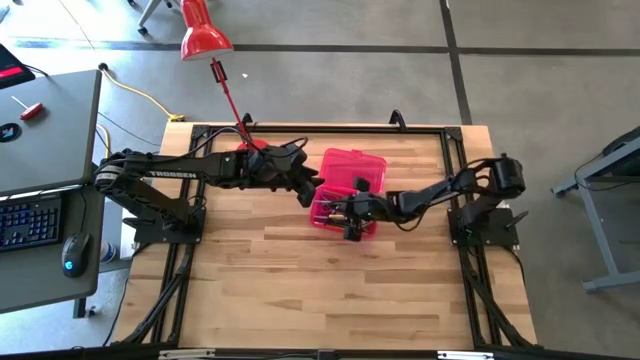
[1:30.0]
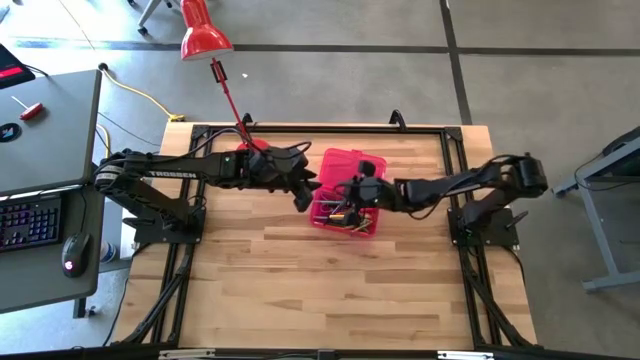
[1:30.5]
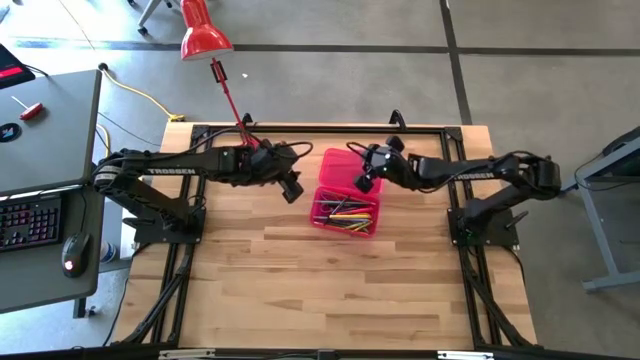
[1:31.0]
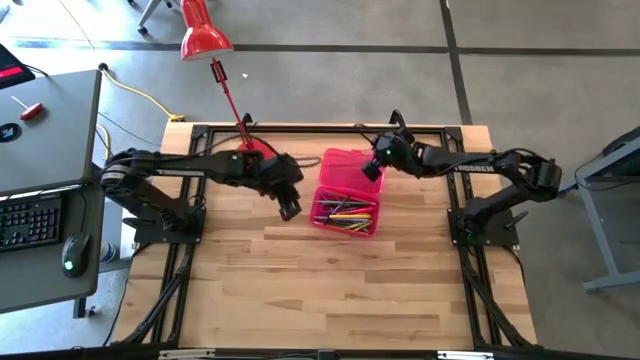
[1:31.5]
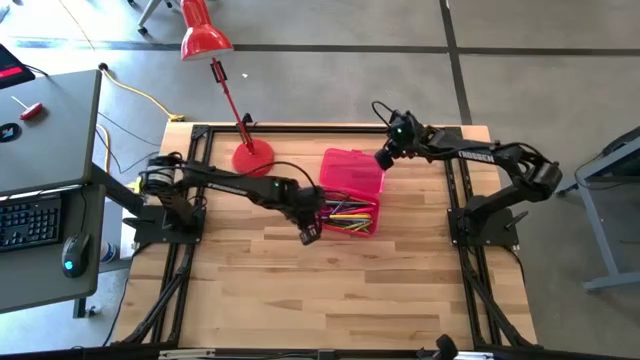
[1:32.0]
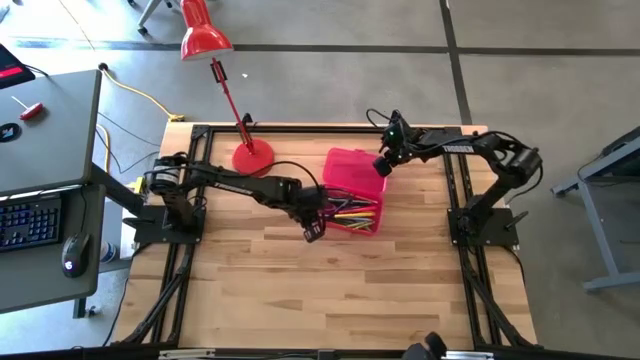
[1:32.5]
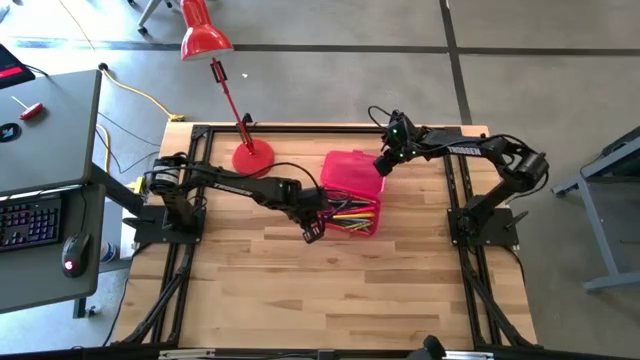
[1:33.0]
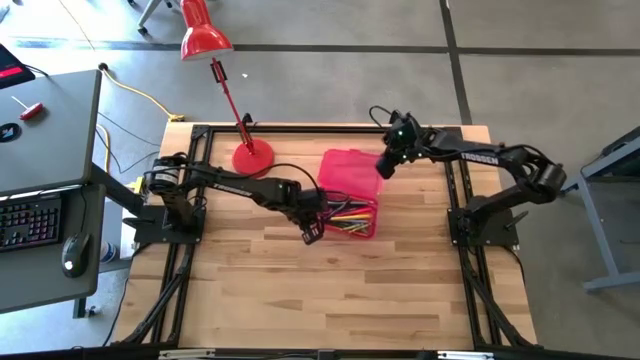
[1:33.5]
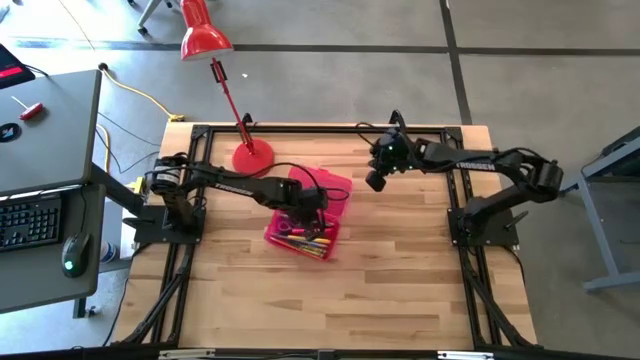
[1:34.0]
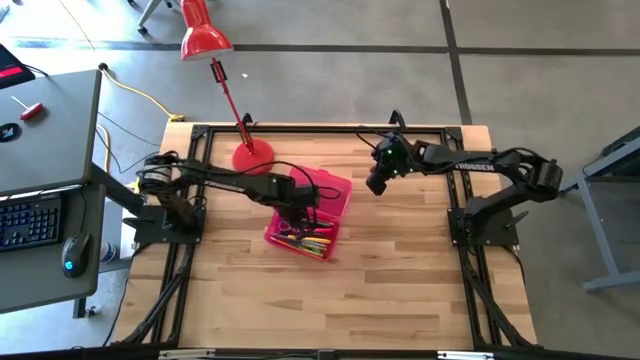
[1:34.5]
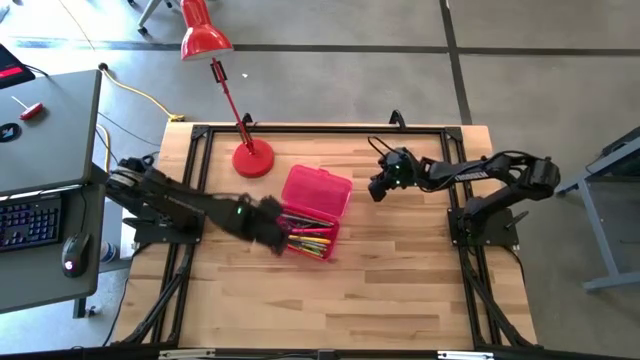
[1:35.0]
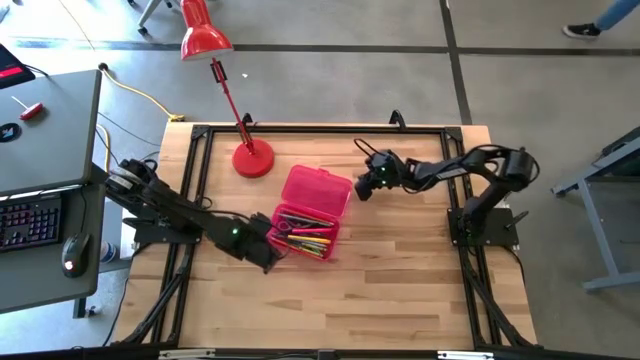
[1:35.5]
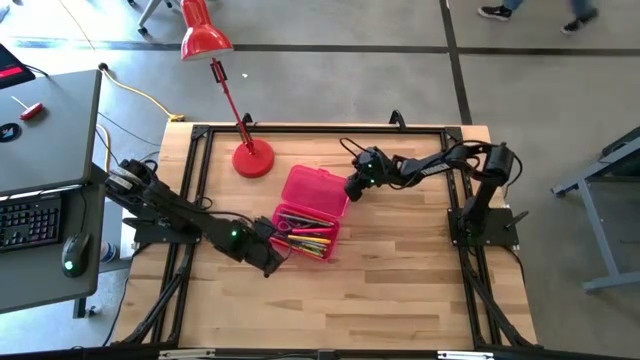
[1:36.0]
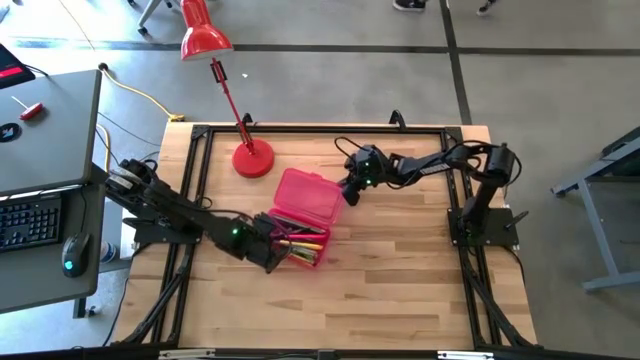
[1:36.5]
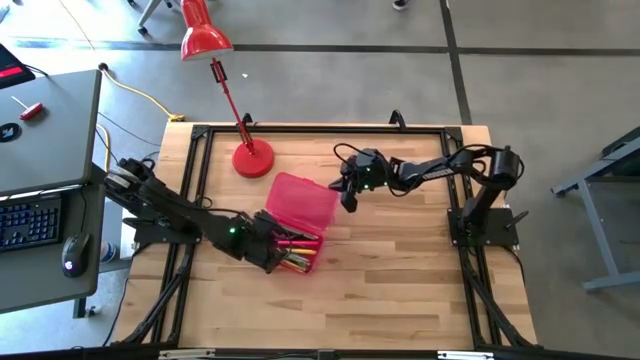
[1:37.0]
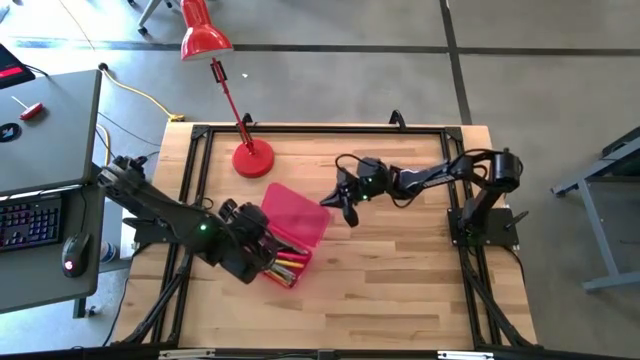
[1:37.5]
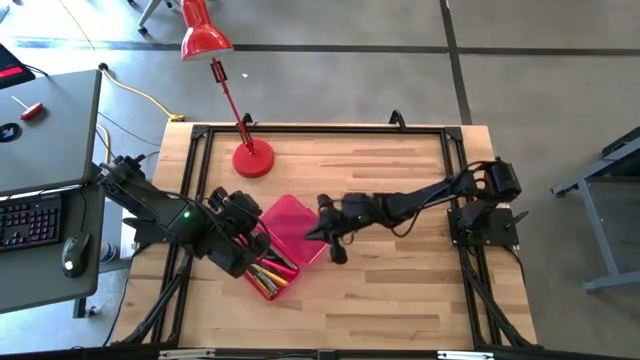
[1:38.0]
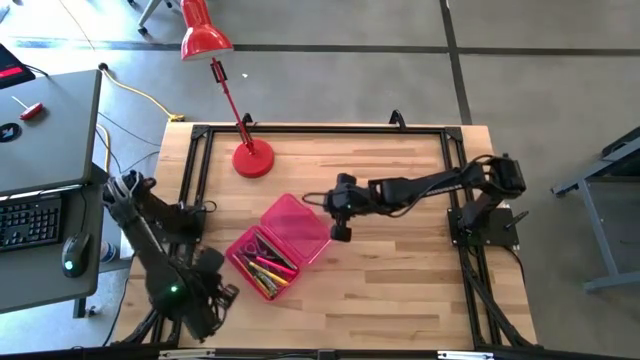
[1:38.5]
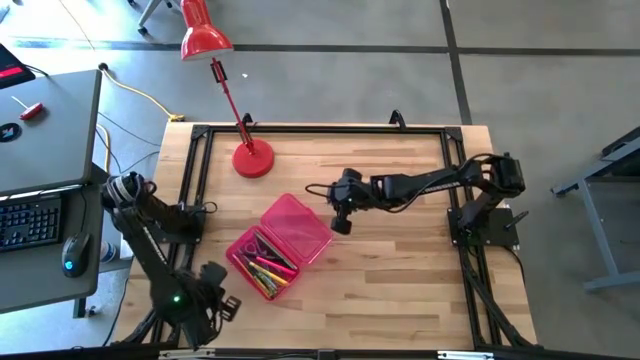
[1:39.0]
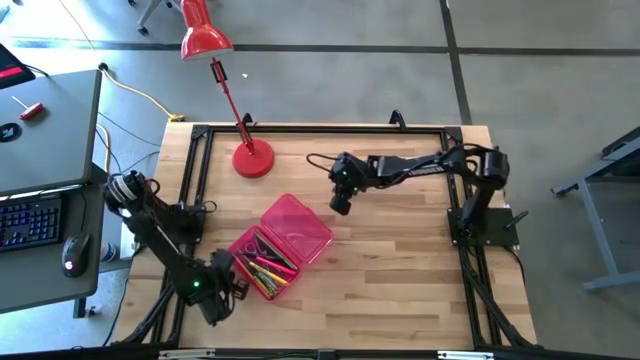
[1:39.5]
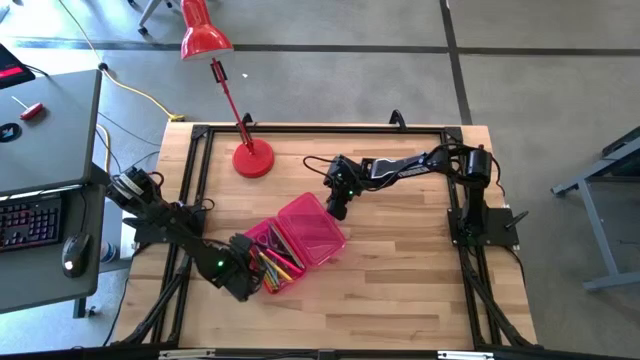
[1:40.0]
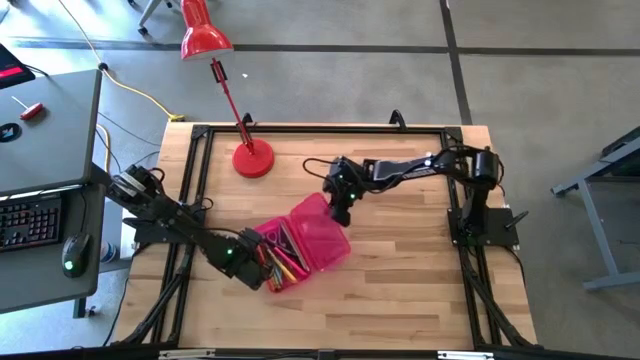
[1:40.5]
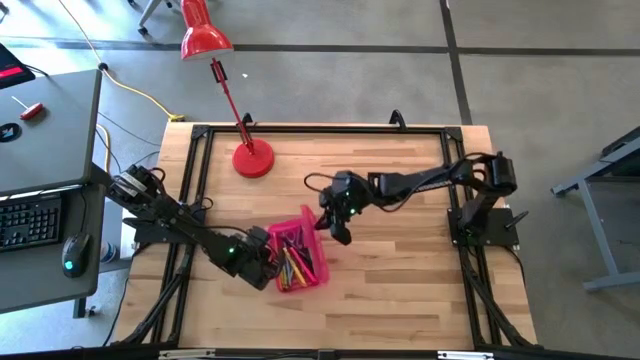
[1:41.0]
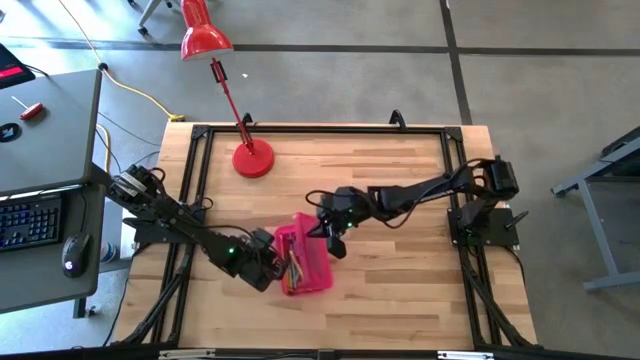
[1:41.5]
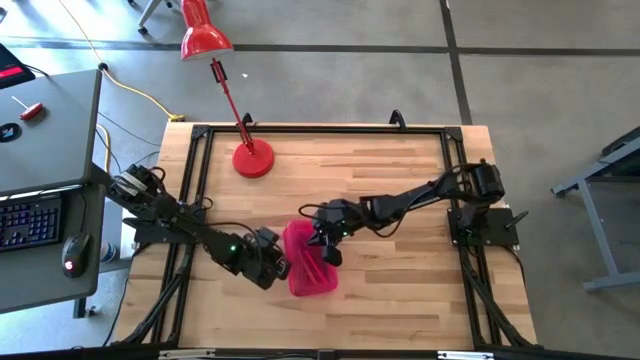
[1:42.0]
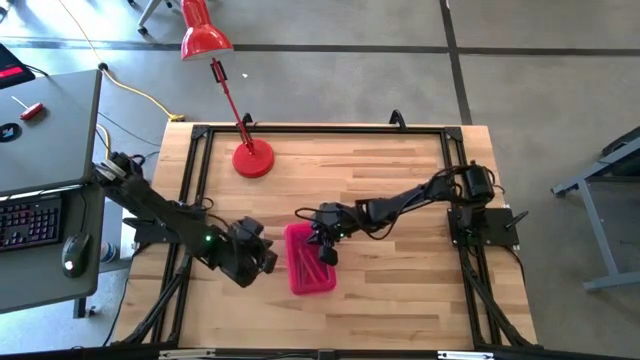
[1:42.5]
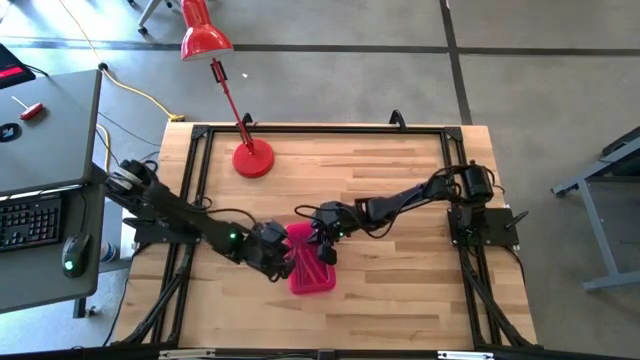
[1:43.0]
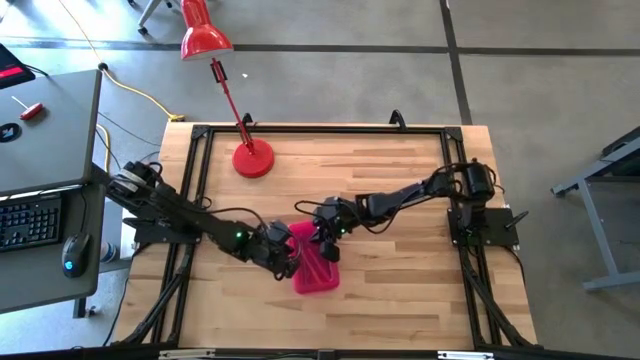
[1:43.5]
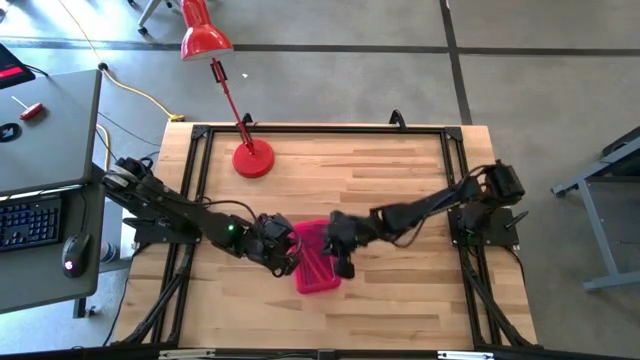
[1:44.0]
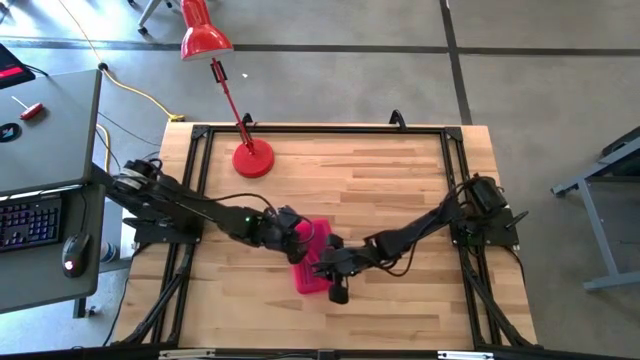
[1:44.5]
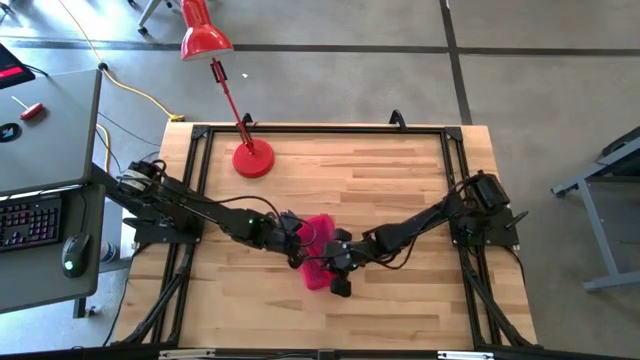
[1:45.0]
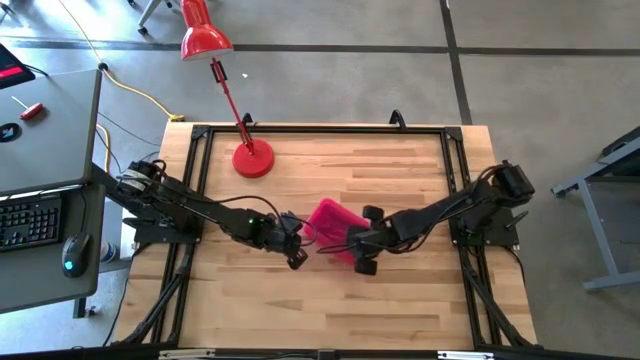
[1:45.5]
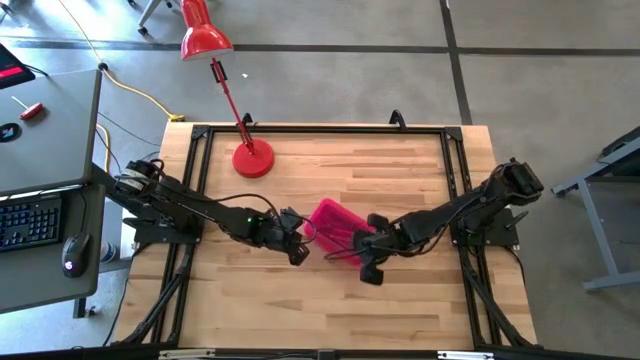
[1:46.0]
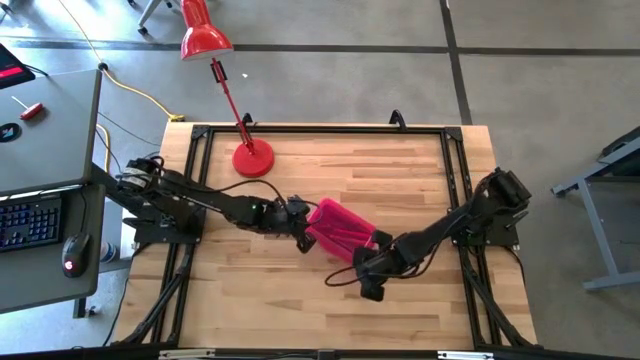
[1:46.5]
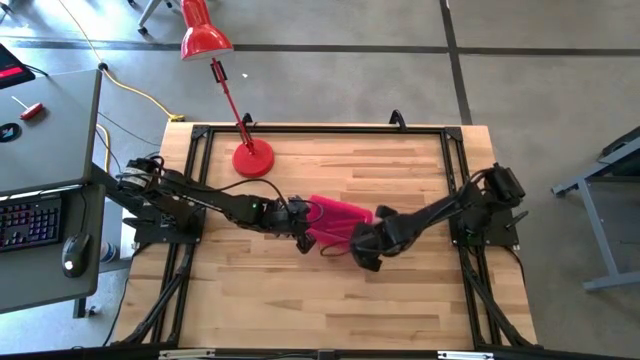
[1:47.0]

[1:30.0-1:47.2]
Task: Pick & place school supplies into a supply box
Close the red supply box

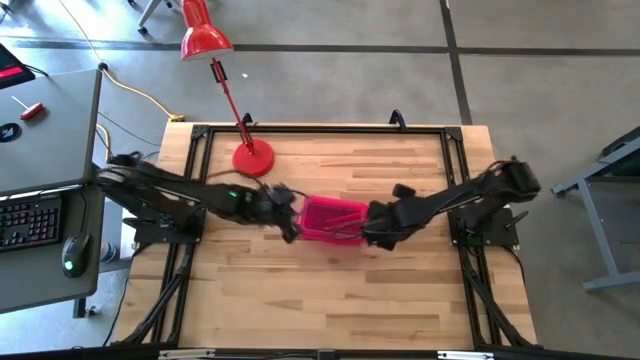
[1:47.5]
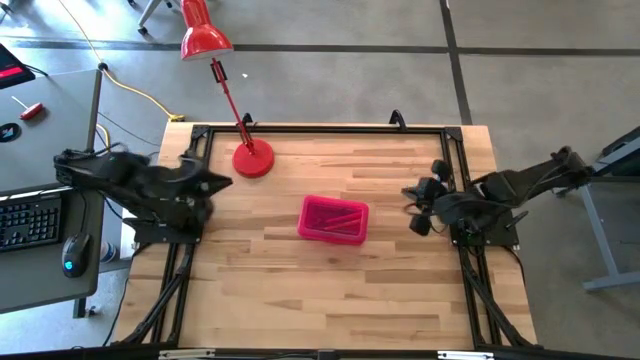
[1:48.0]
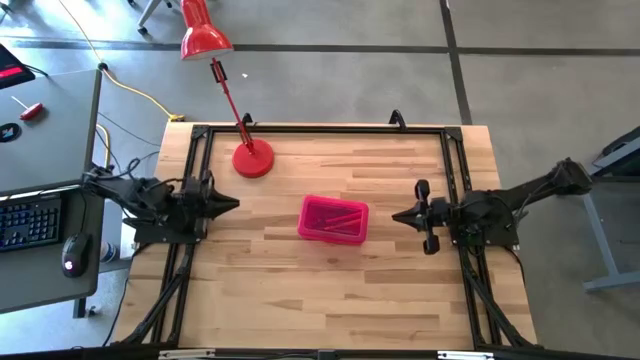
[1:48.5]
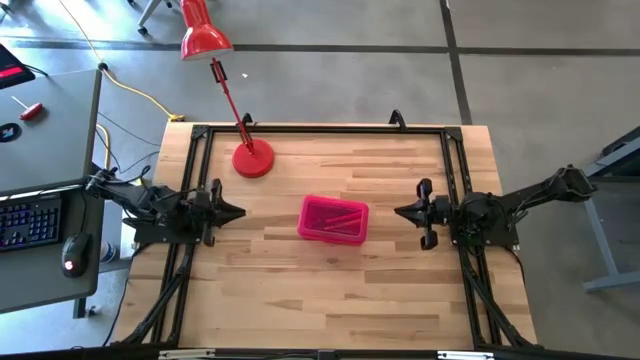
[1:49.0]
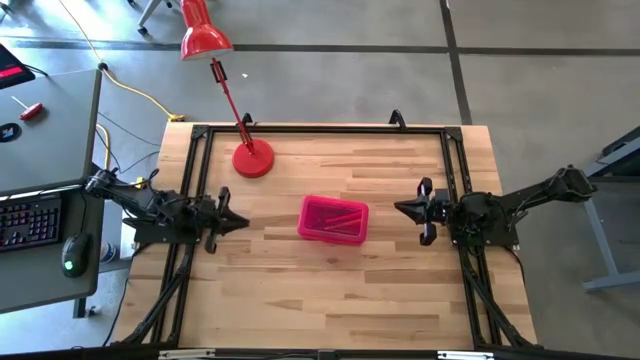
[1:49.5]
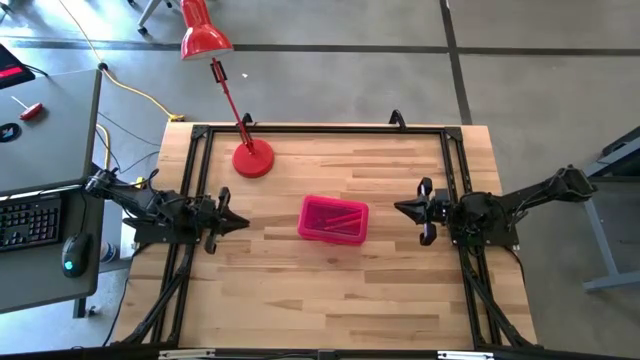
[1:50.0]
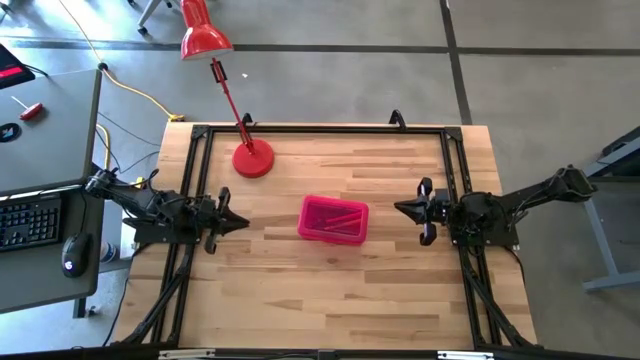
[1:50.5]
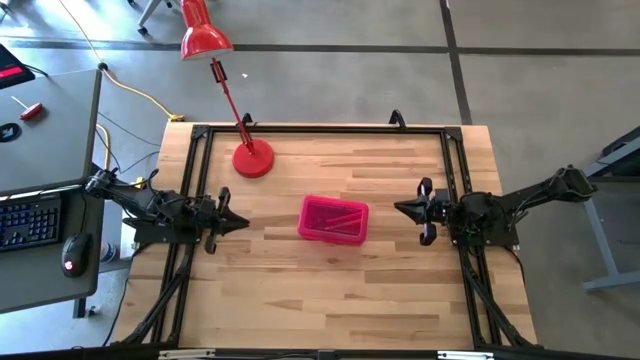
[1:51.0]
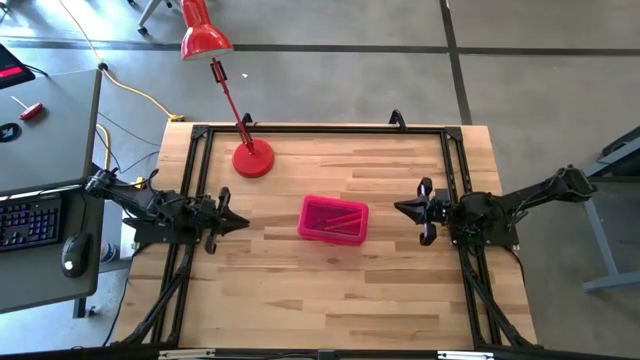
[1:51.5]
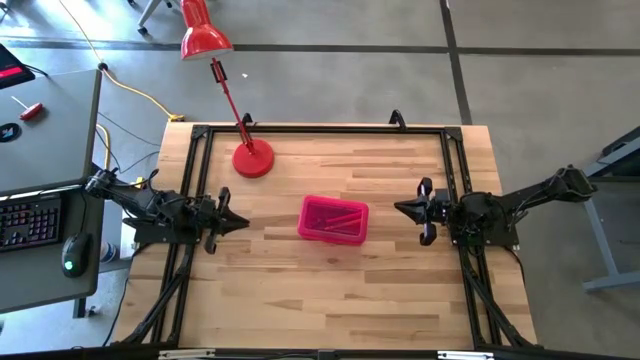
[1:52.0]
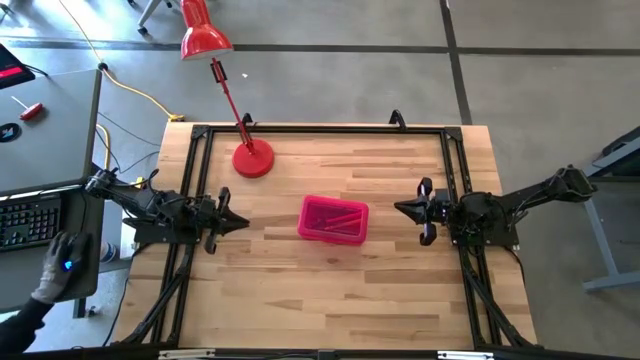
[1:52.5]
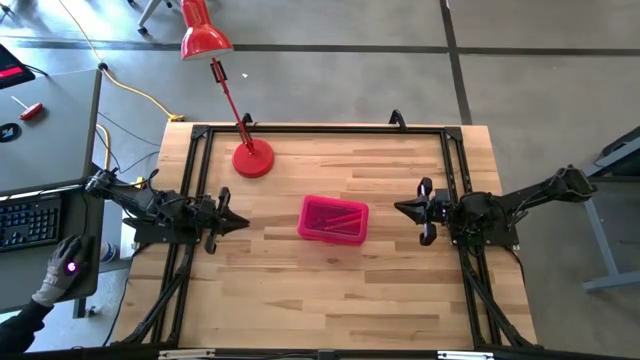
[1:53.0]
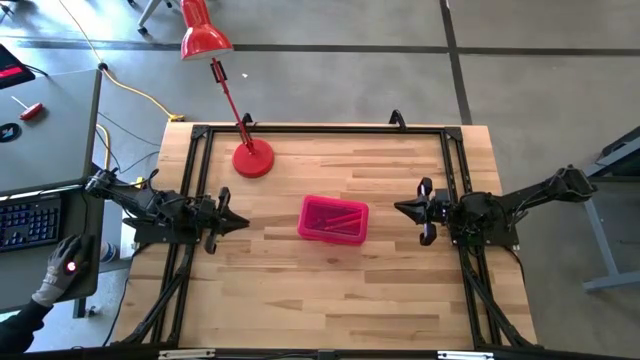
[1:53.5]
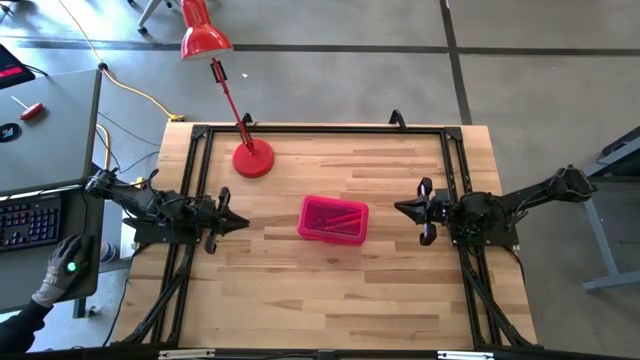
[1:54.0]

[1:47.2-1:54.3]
Return to Home Position
